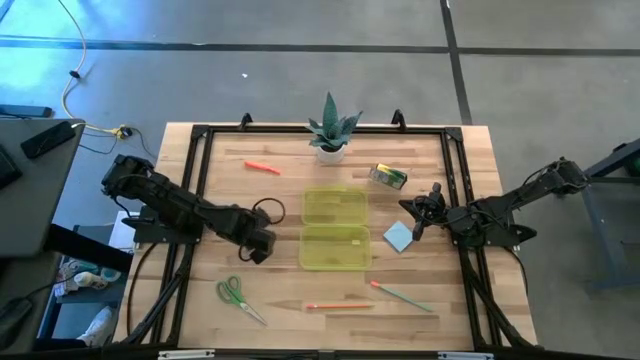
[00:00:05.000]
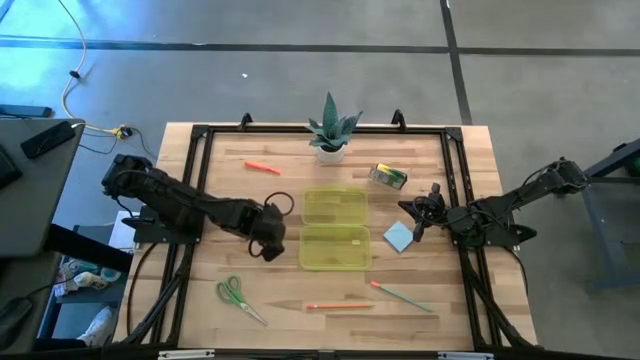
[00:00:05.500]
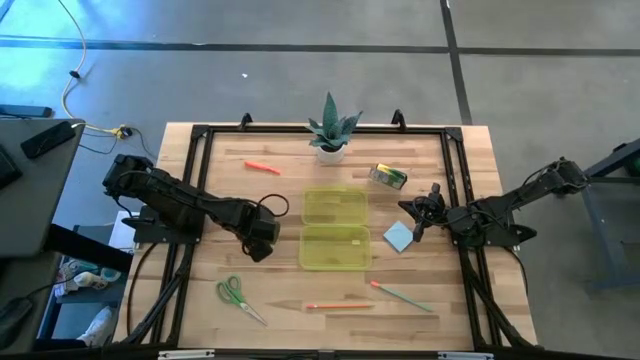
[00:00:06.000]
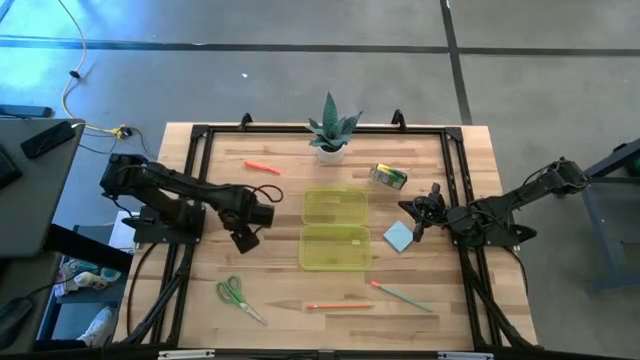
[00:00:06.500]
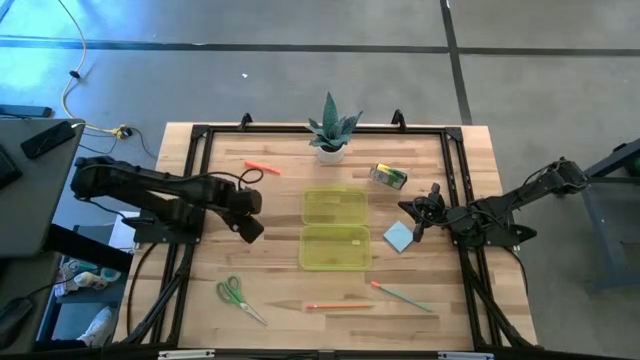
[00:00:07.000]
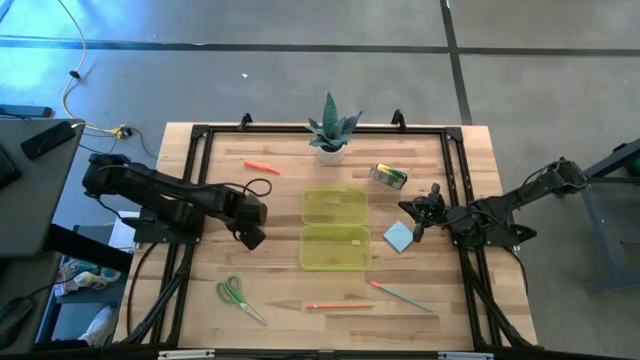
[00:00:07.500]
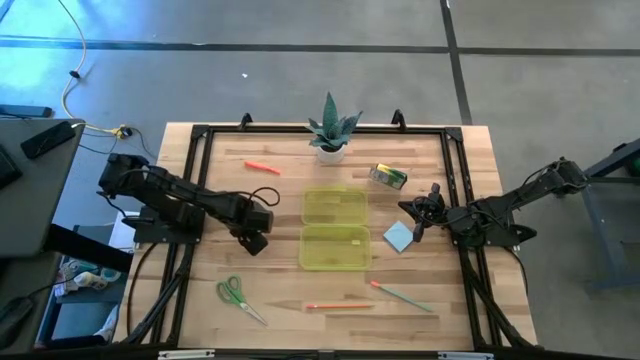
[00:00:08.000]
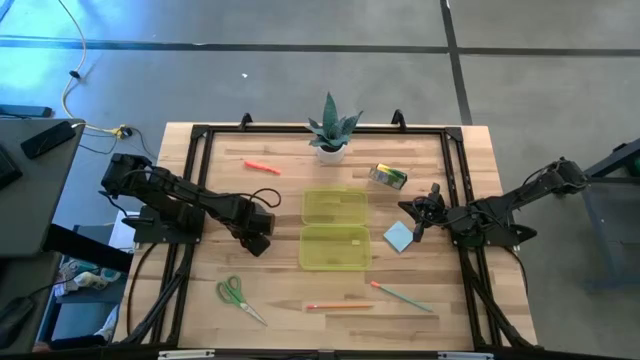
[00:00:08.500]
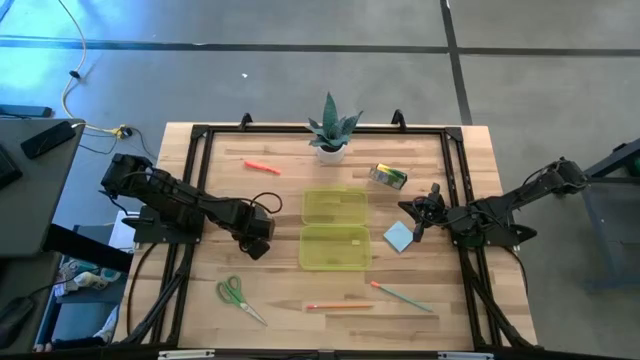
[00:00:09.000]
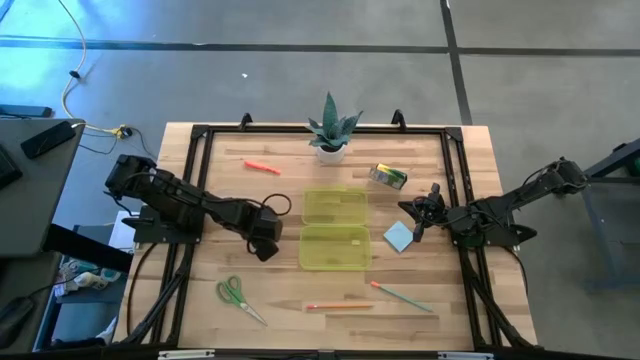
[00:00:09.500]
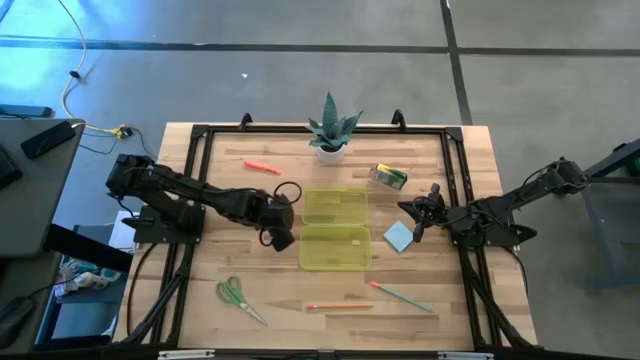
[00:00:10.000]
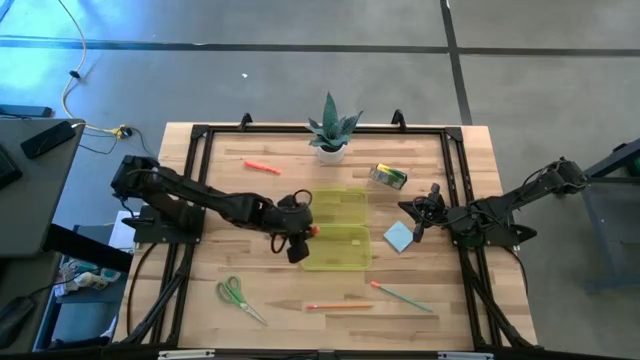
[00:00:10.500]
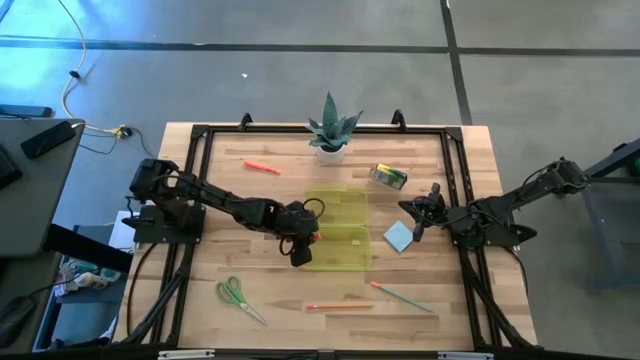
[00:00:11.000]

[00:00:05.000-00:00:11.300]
Task: Pack school essentials
Put the orange eraser into the yellow supply box

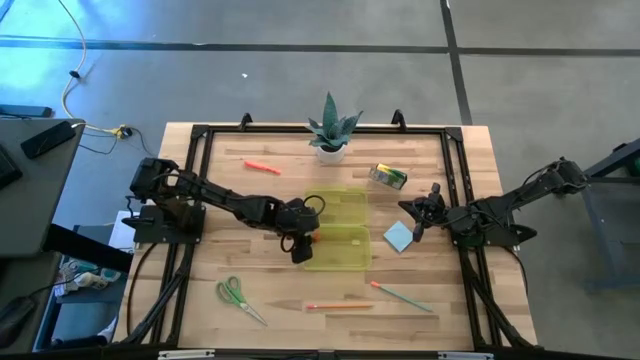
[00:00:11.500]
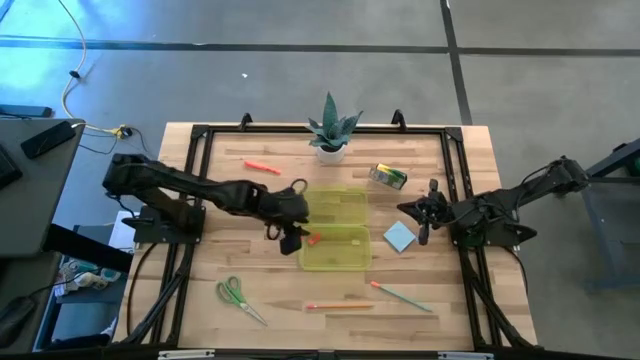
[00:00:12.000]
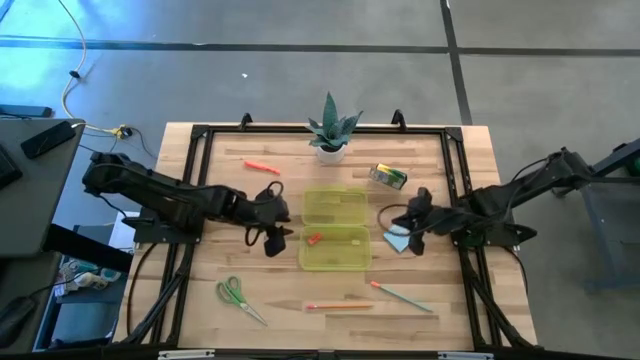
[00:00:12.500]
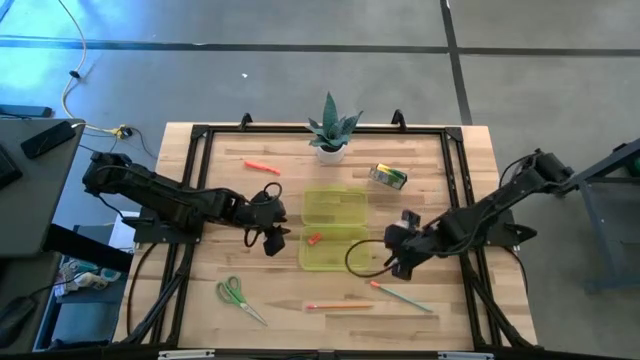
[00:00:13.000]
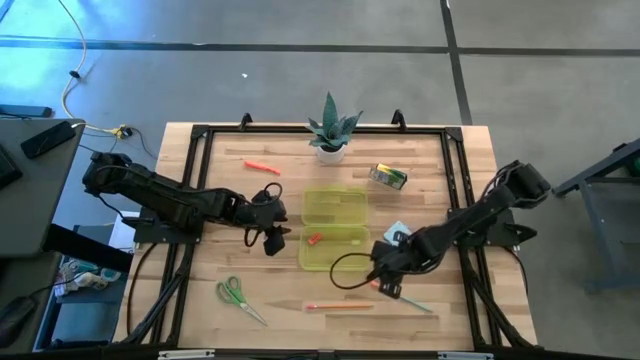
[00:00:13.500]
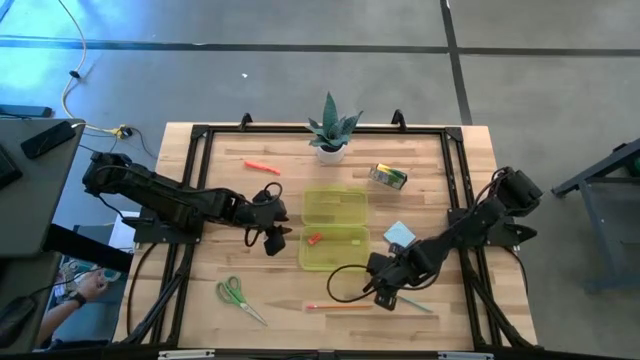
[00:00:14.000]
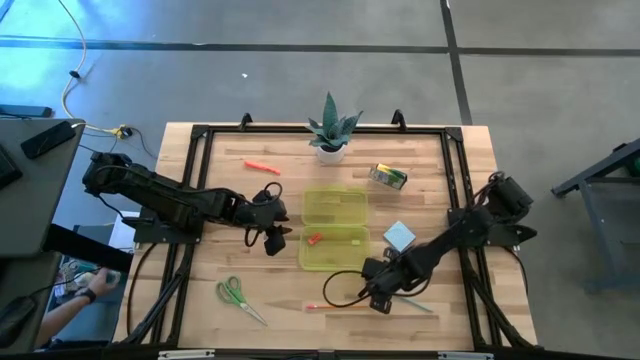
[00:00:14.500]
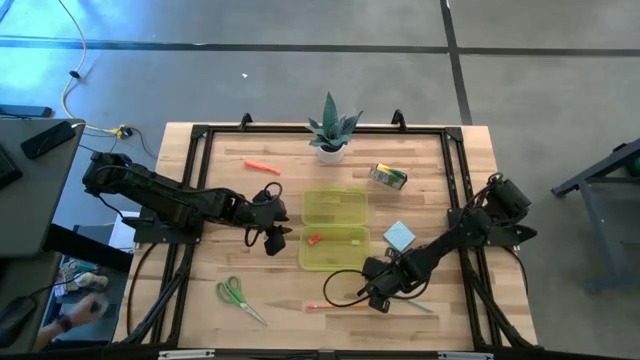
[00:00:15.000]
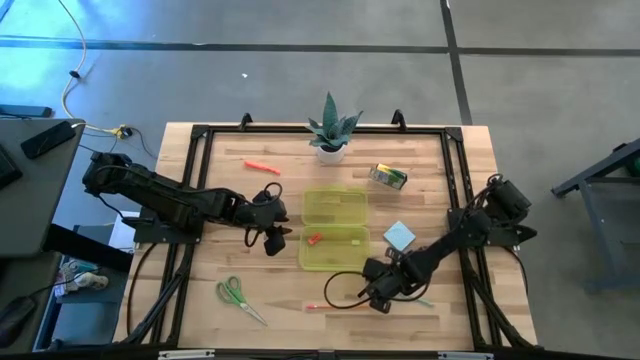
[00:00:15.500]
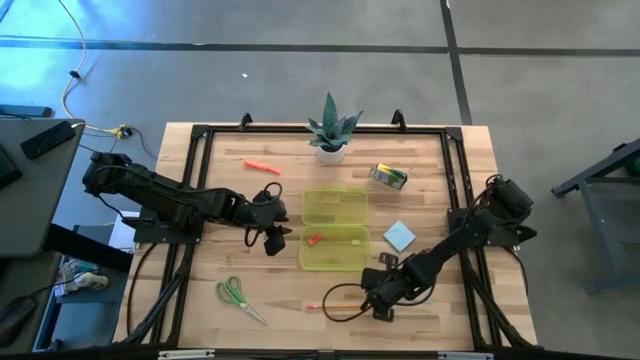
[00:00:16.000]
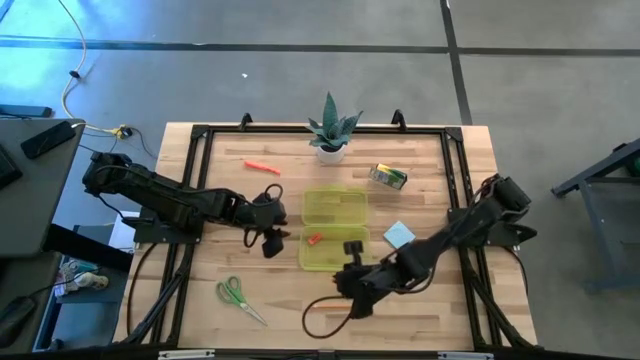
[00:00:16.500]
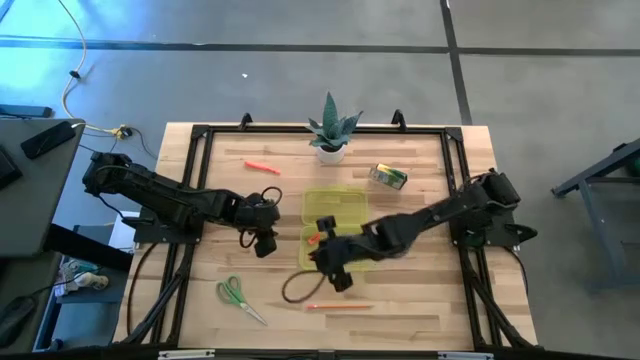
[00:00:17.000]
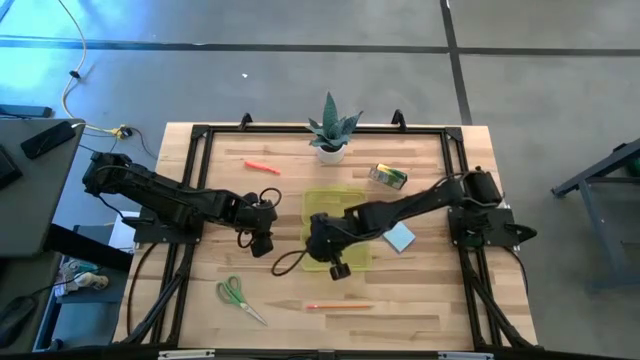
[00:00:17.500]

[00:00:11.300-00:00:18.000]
Put the blue pencil into the yellow supply box

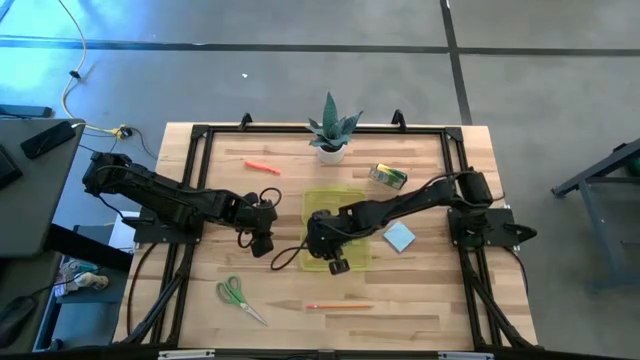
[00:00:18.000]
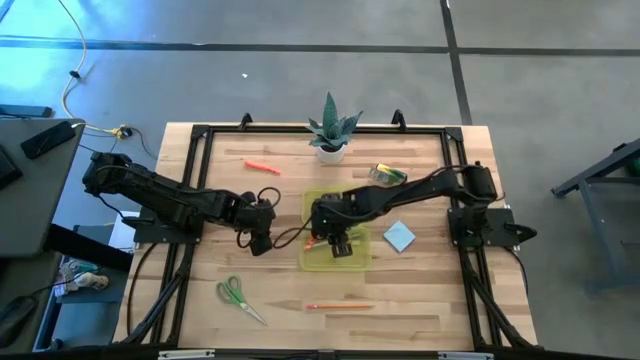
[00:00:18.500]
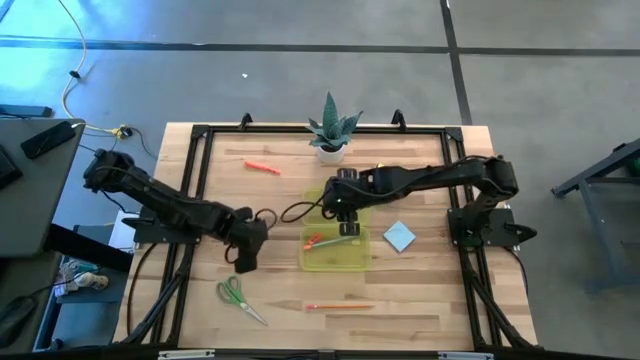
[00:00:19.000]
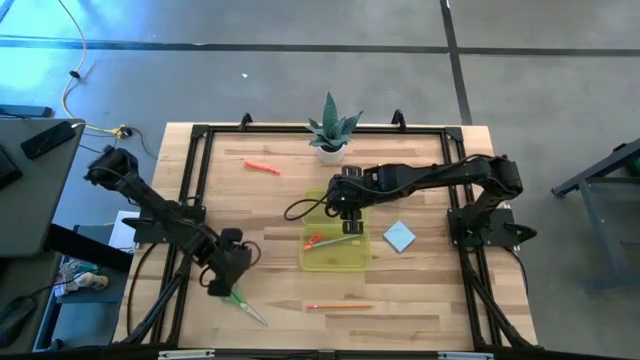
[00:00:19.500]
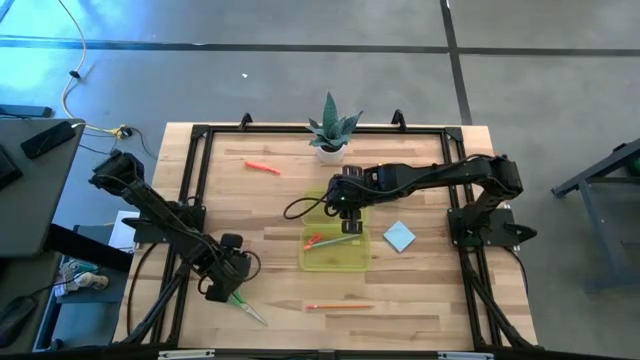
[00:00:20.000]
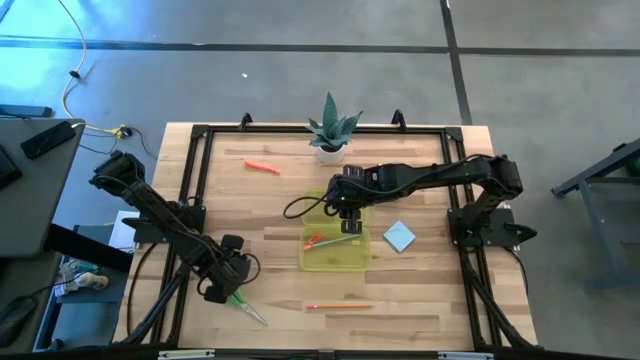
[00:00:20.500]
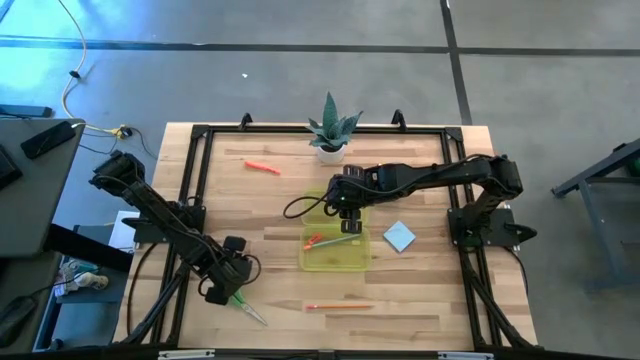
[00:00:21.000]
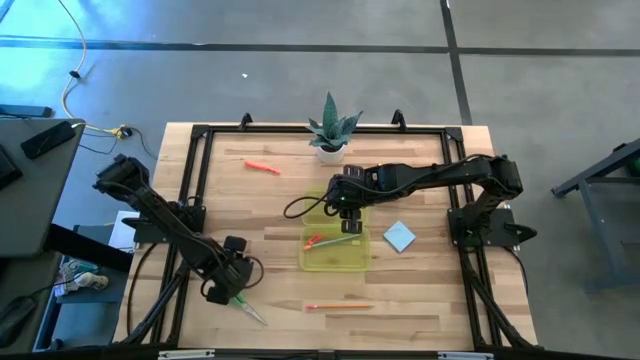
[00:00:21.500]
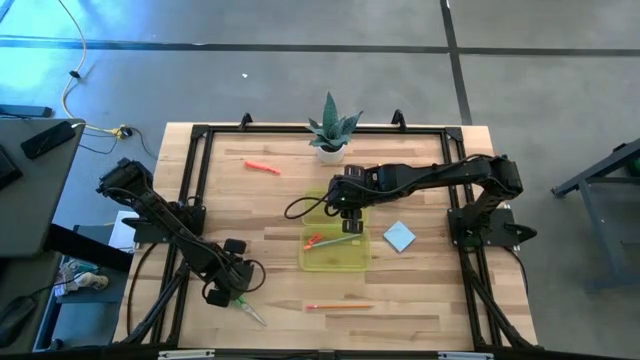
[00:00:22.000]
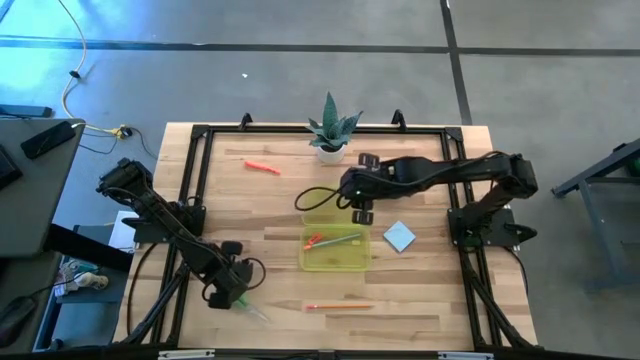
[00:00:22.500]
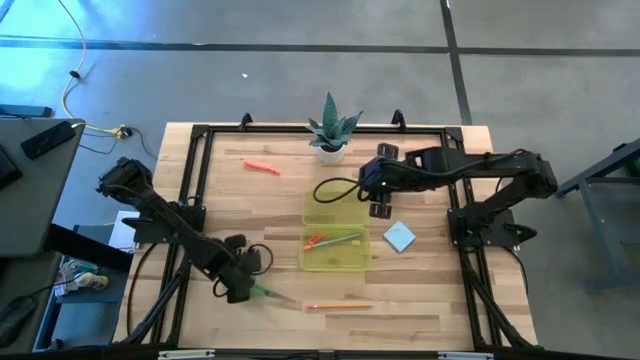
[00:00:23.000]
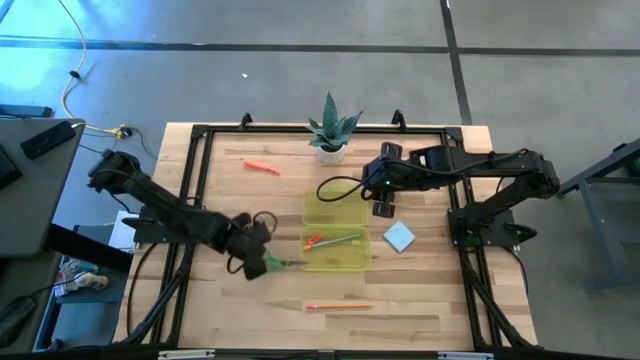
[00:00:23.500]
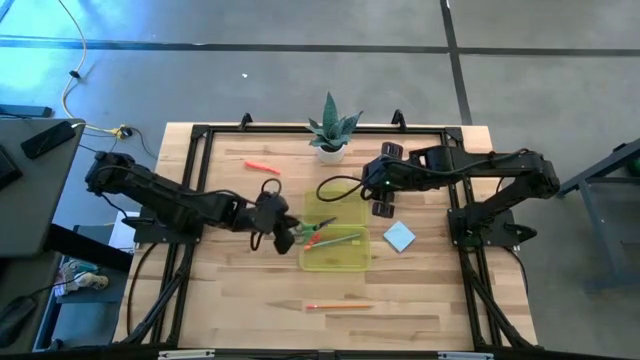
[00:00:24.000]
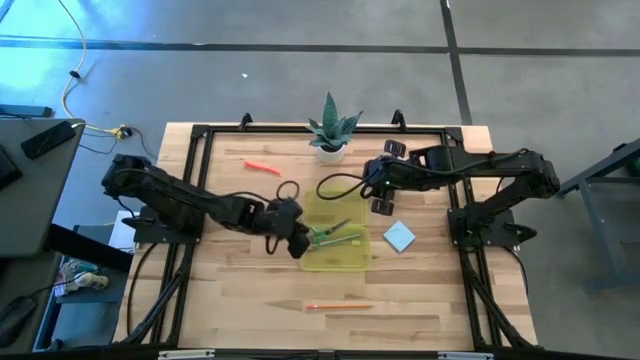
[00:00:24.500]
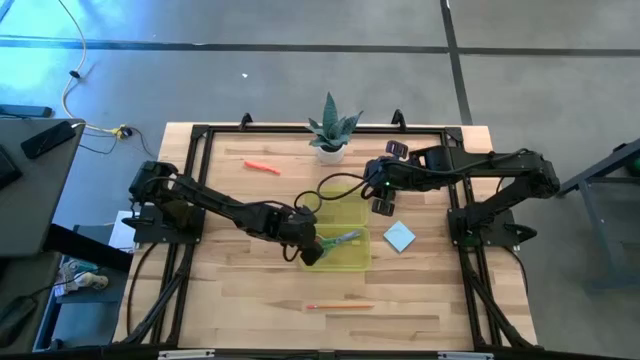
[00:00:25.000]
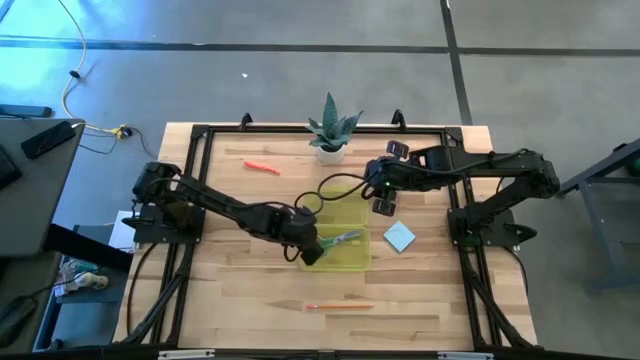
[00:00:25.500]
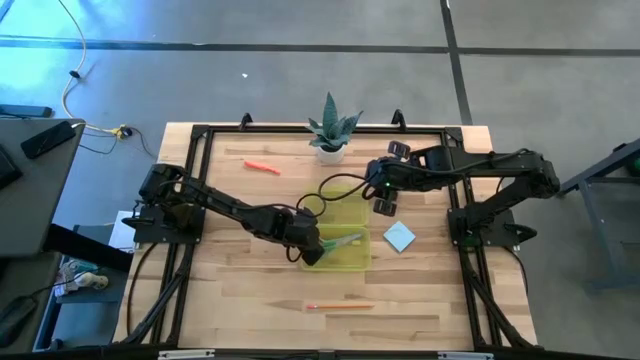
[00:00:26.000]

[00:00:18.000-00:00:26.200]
Put the green scissors into the yellow supply box
